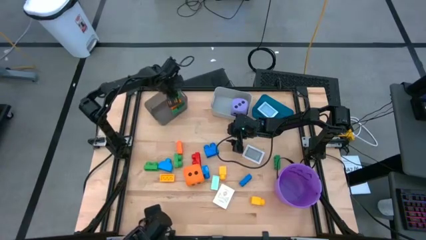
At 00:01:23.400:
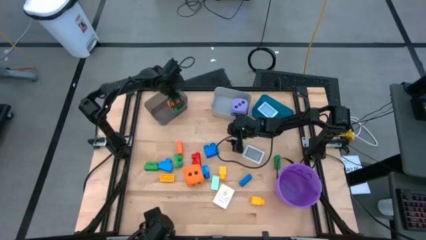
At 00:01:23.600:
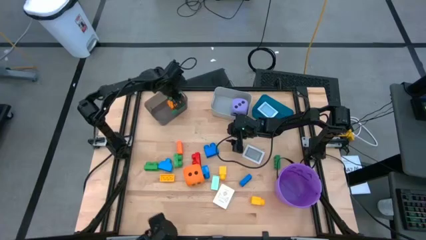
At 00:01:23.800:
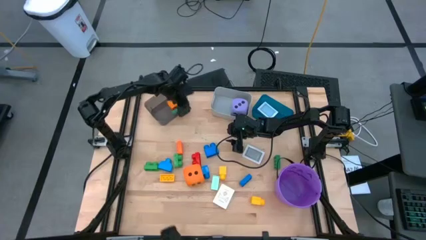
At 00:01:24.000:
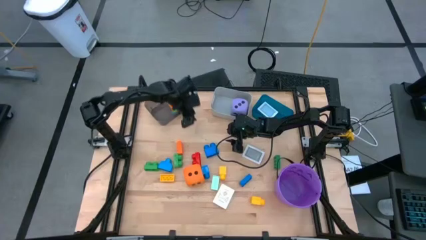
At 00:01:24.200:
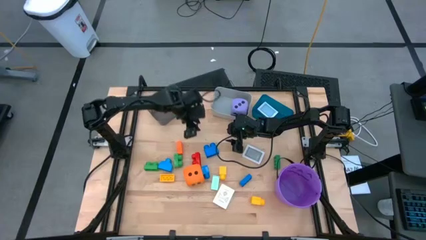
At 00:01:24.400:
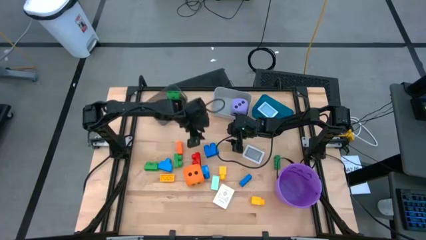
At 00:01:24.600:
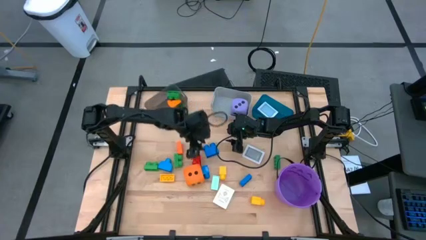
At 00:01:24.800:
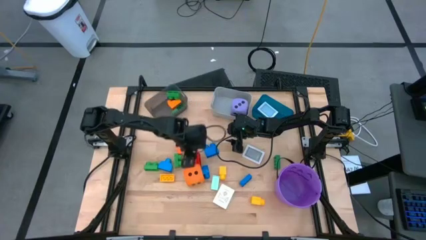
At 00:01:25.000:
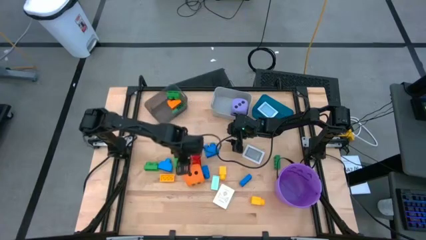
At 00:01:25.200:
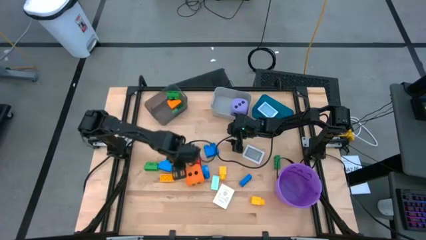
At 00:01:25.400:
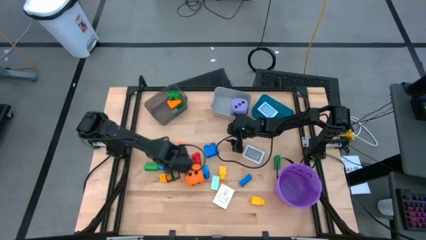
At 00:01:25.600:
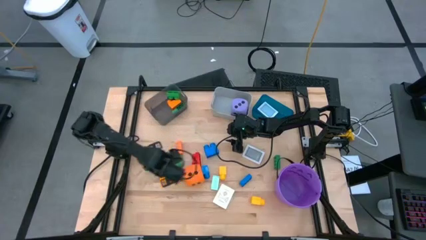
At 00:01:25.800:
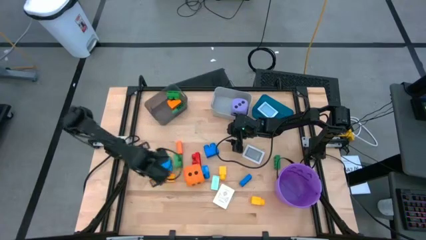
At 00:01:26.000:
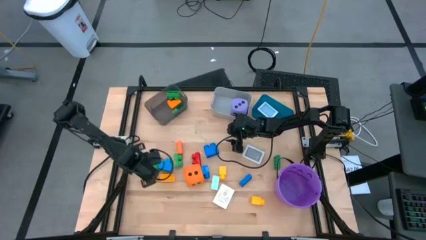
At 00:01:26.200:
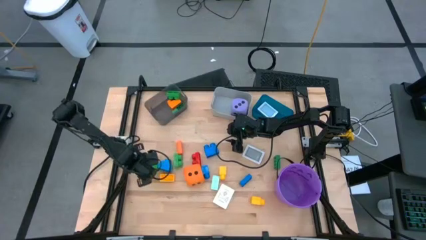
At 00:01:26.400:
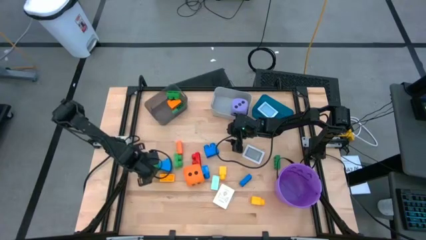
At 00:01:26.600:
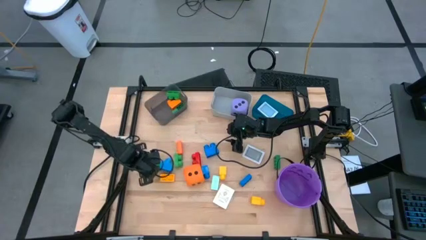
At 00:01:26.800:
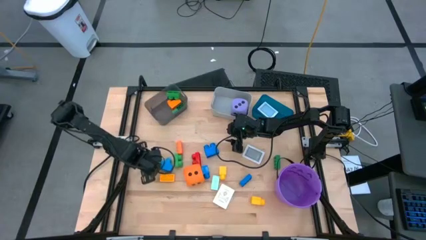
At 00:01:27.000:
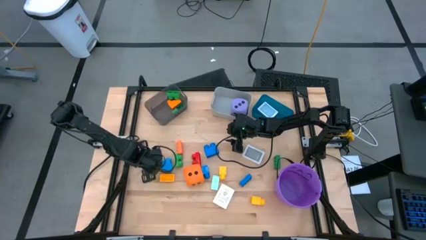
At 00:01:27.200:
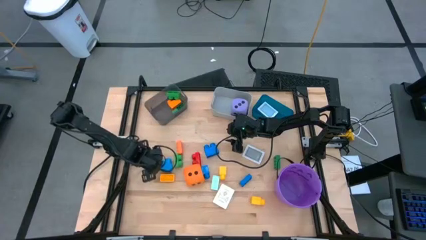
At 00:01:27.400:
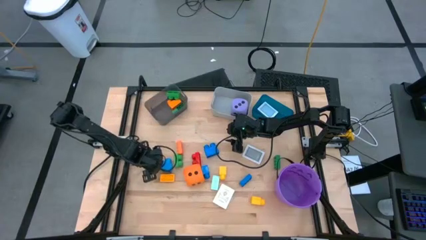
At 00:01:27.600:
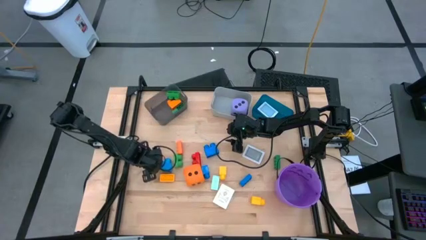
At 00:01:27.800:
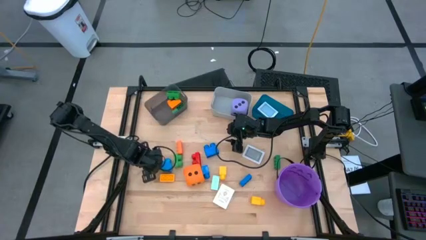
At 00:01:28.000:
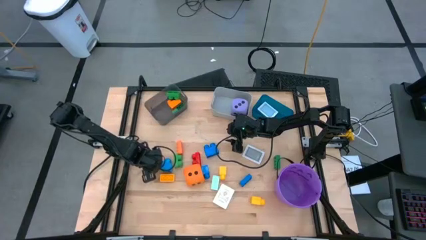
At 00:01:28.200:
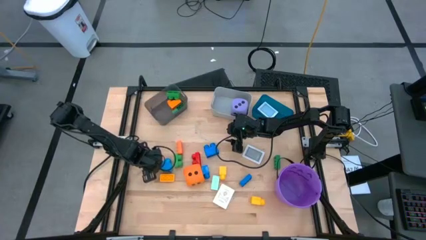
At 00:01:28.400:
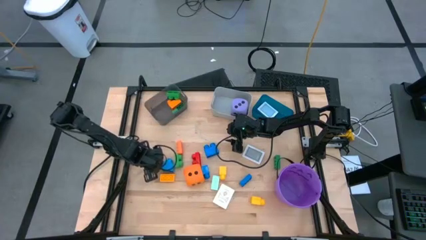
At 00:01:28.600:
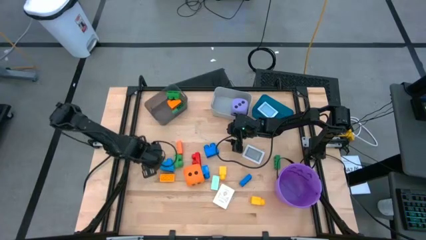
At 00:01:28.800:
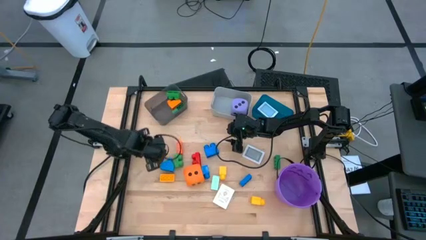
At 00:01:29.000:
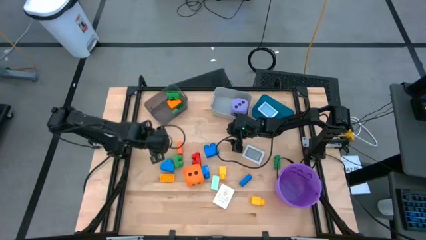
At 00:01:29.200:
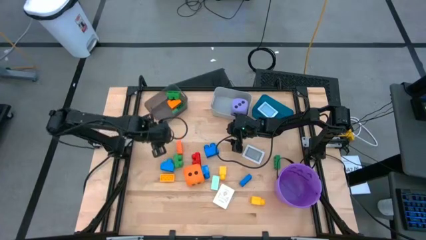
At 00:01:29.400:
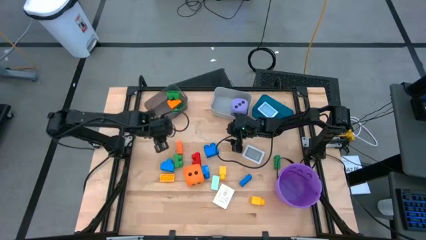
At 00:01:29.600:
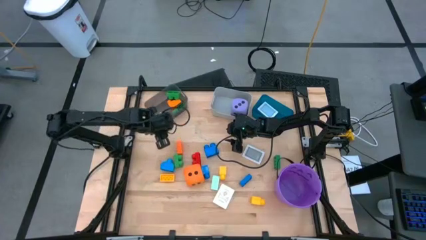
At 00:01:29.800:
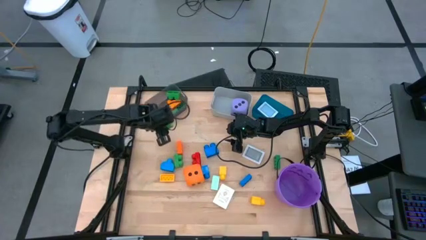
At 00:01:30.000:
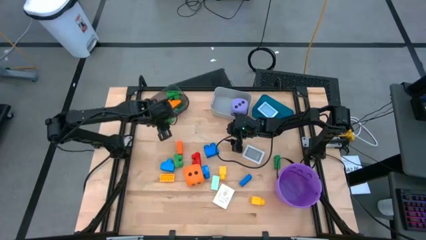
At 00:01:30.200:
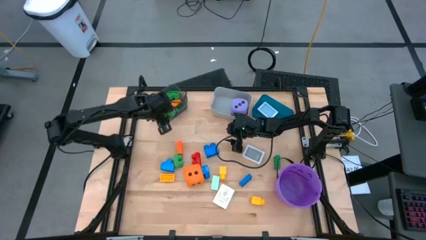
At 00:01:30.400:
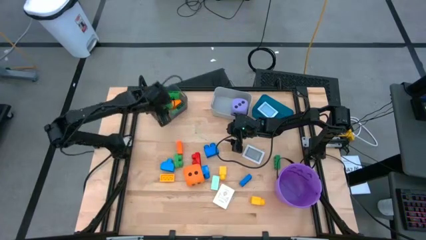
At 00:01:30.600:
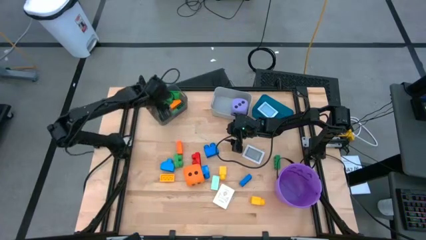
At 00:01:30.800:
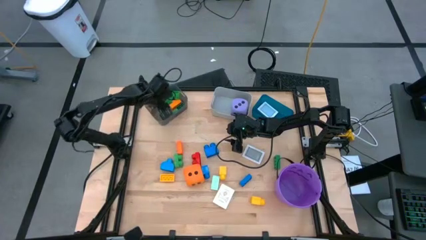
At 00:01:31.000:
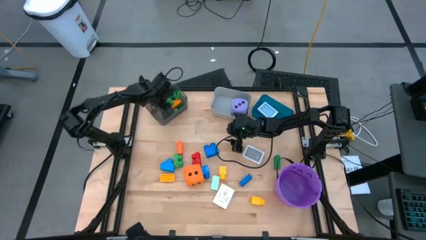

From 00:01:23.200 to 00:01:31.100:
Task: Pick & Place Toys
Put the green gamepiece into the black bin

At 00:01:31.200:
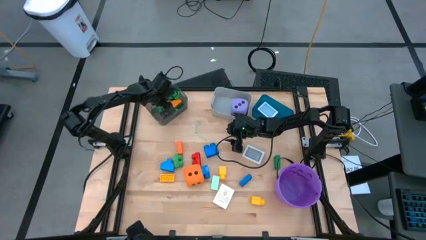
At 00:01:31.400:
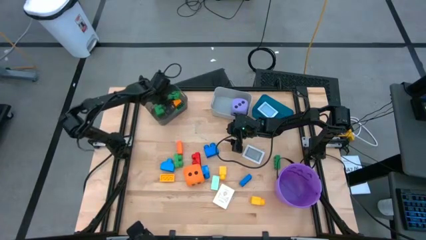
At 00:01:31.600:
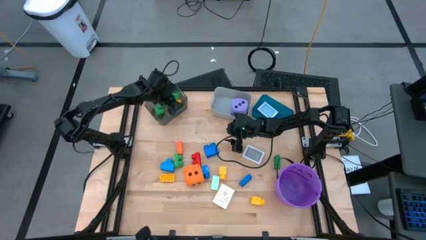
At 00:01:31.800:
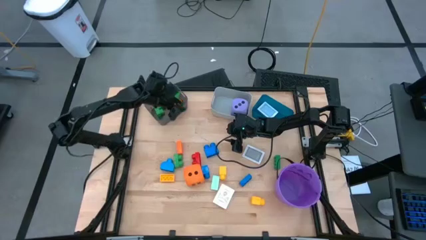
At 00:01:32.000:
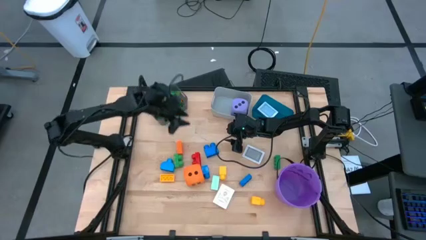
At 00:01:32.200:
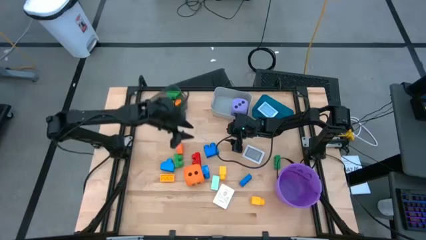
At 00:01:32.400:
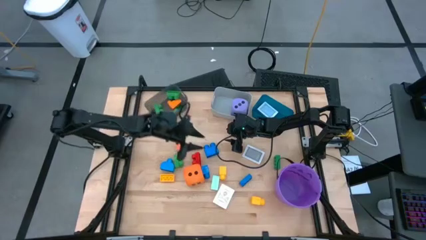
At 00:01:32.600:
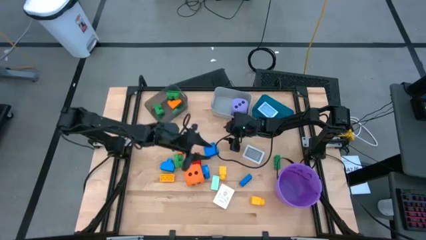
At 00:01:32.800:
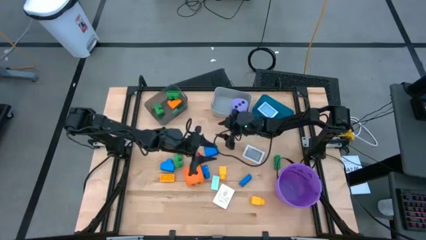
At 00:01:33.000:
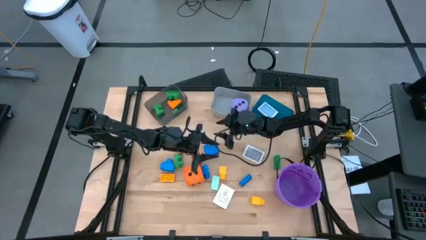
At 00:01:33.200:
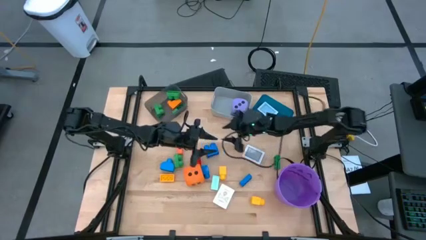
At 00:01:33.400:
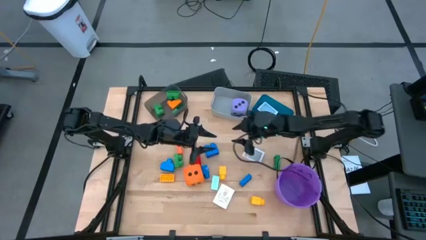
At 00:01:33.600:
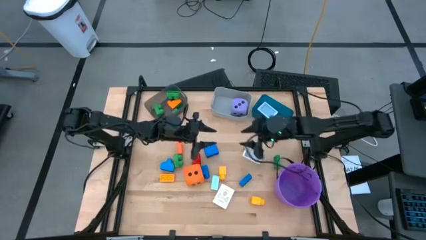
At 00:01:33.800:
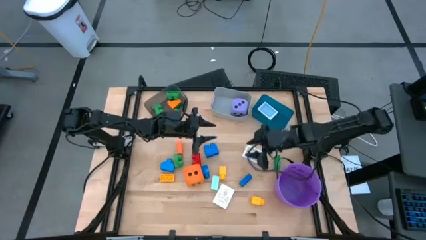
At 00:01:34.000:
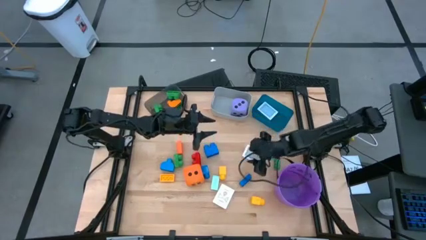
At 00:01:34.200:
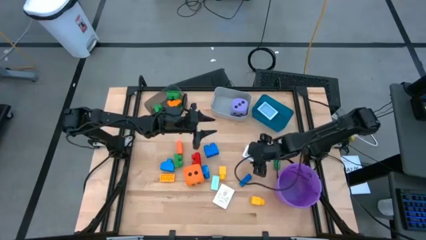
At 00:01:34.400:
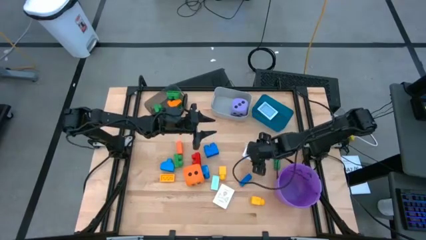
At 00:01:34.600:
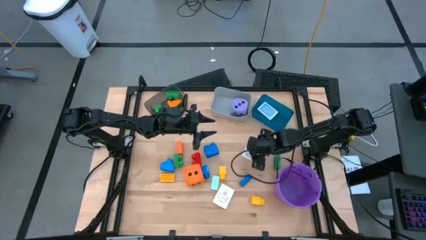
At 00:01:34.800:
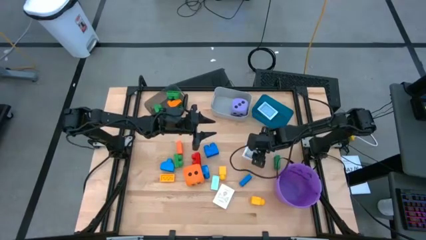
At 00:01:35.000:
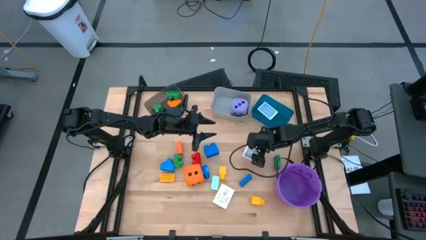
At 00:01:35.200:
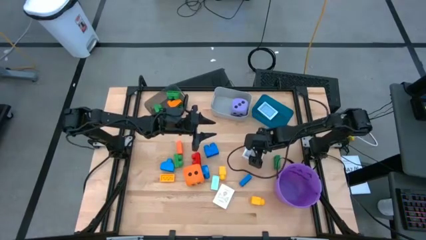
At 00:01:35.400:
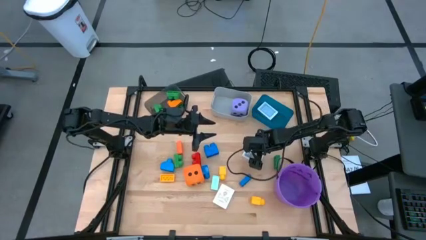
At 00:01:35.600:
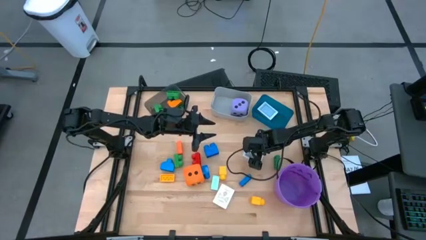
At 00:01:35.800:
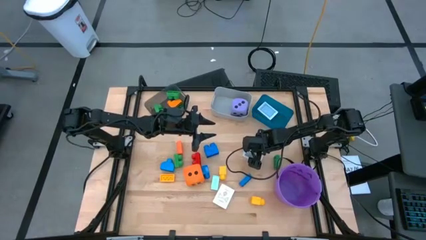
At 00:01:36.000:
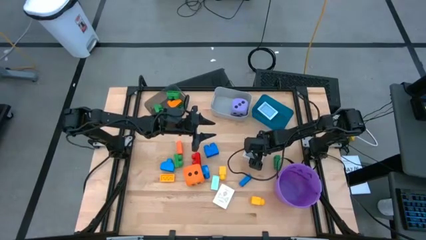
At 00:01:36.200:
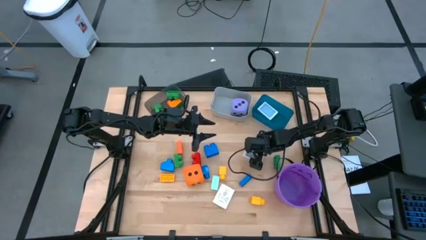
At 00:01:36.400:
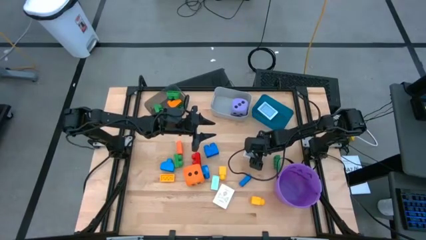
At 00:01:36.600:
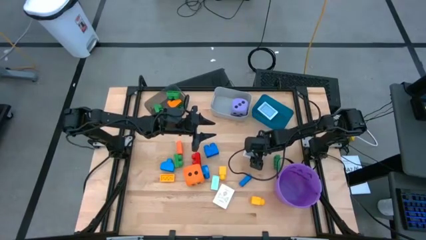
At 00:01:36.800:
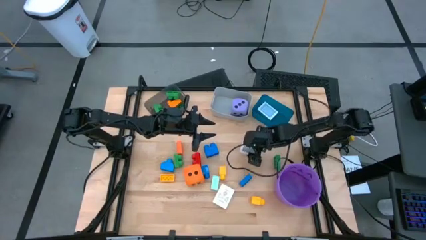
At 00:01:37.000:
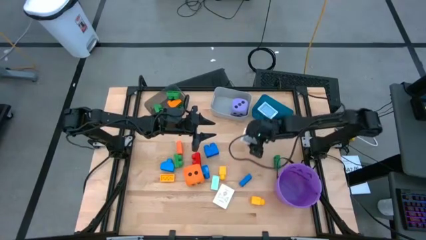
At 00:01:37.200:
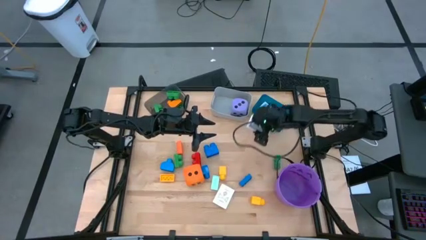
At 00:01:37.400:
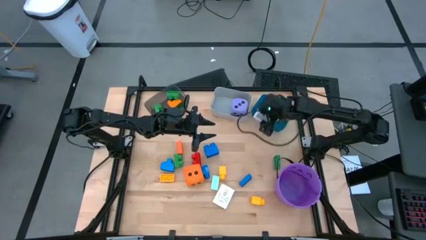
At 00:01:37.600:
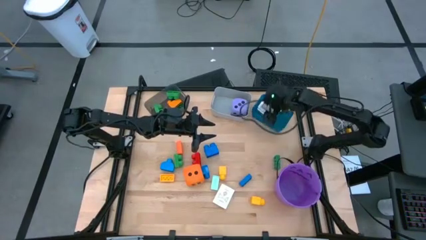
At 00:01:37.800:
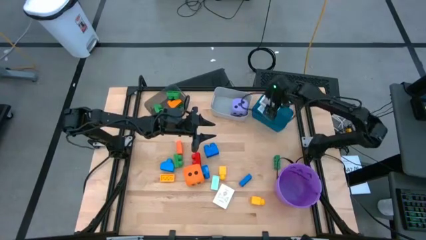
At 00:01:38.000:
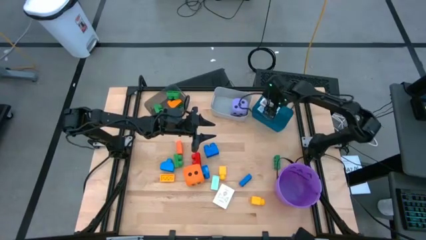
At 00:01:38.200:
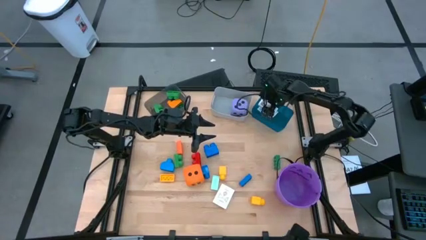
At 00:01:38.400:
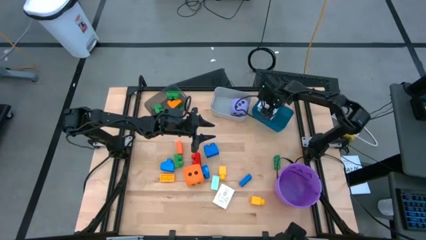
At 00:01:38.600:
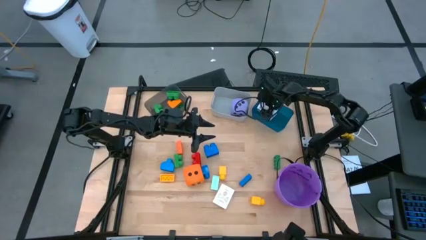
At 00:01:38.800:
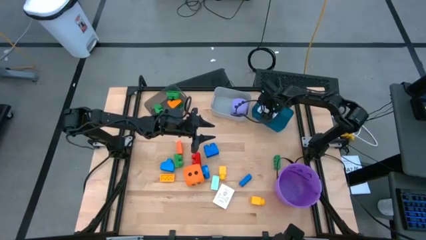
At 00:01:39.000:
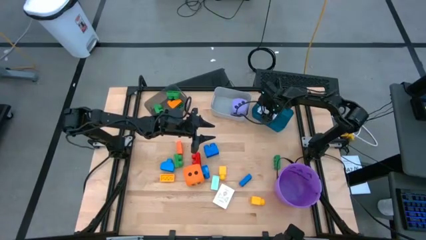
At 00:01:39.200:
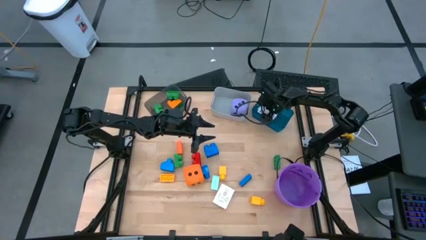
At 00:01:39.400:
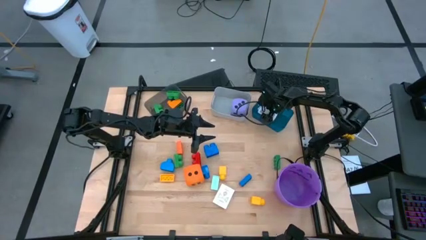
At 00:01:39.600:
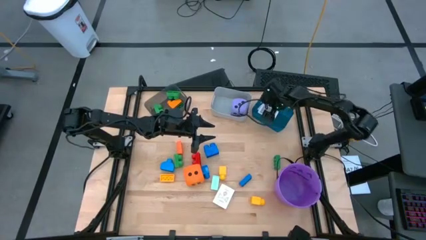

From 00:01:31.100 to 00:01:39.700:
Put the black deck of cards into the blue bin
